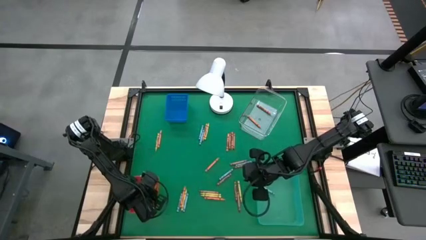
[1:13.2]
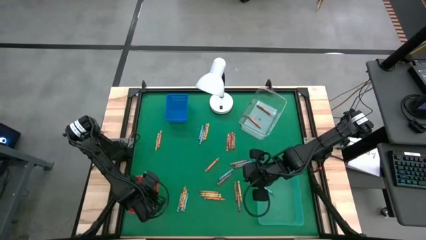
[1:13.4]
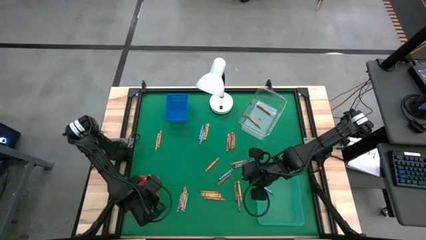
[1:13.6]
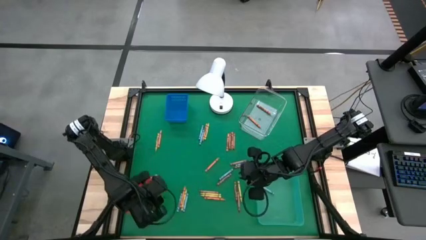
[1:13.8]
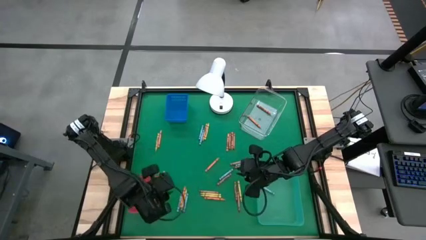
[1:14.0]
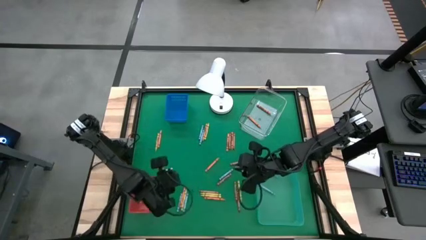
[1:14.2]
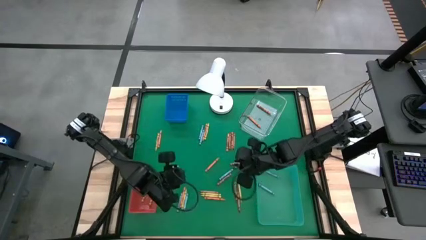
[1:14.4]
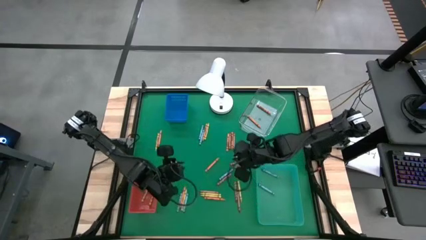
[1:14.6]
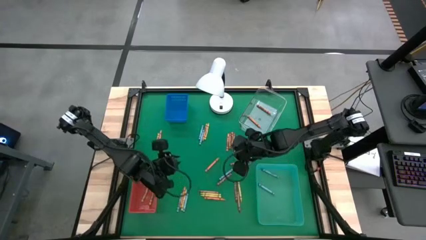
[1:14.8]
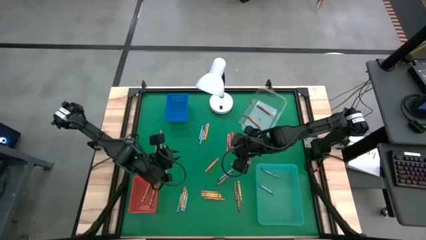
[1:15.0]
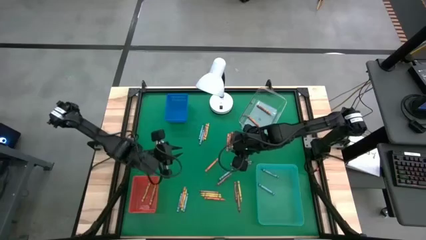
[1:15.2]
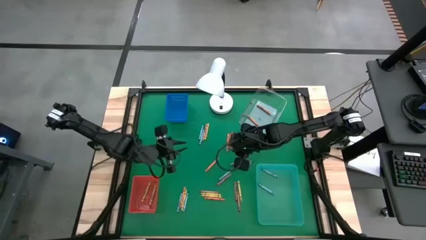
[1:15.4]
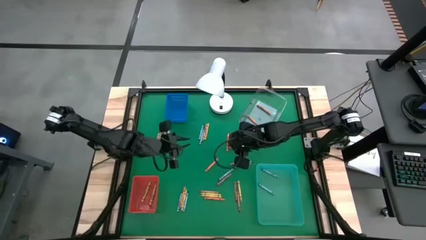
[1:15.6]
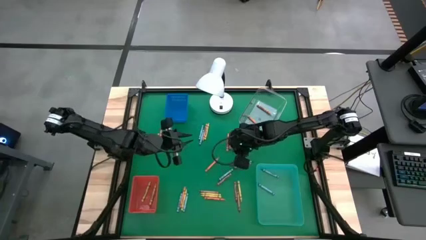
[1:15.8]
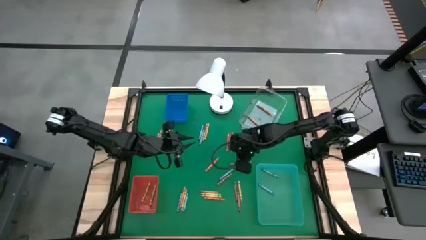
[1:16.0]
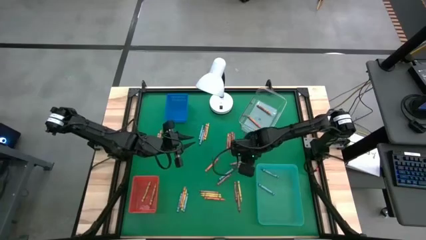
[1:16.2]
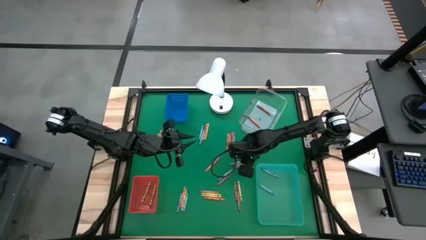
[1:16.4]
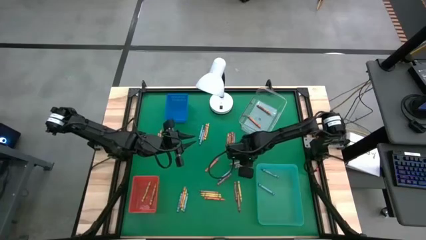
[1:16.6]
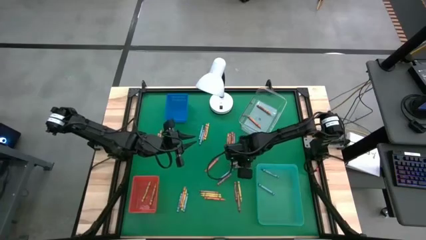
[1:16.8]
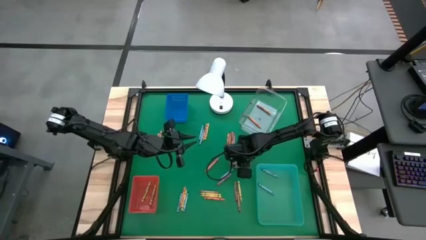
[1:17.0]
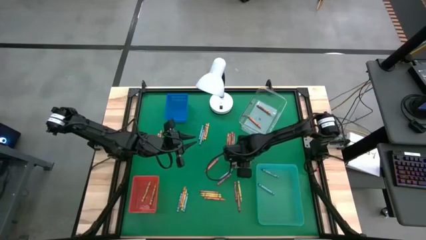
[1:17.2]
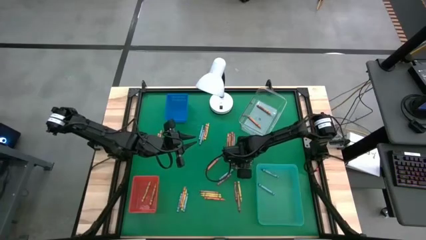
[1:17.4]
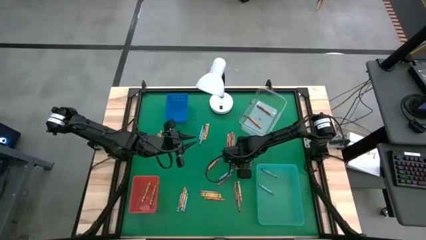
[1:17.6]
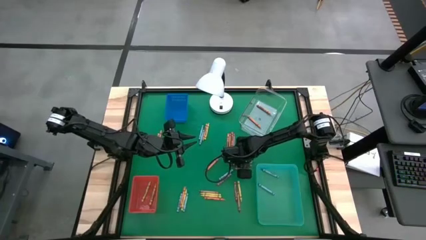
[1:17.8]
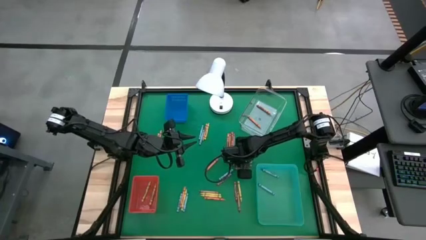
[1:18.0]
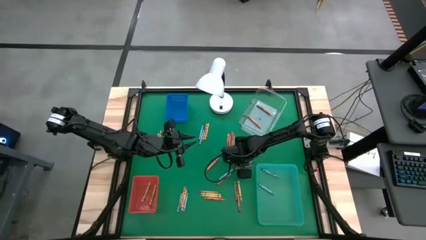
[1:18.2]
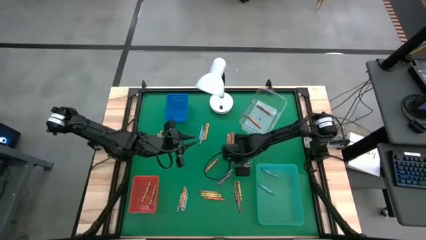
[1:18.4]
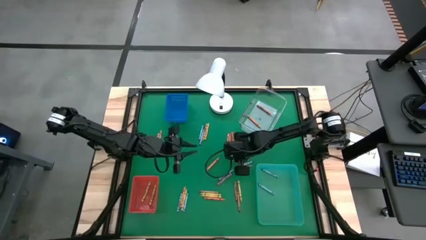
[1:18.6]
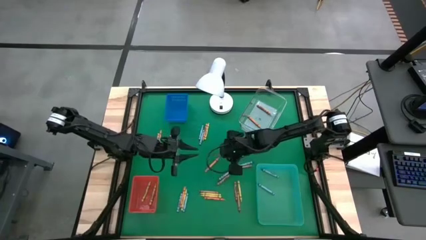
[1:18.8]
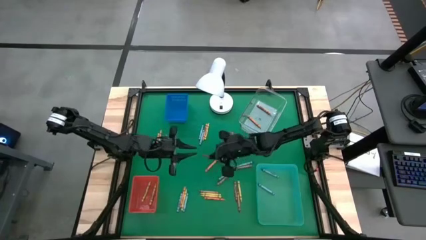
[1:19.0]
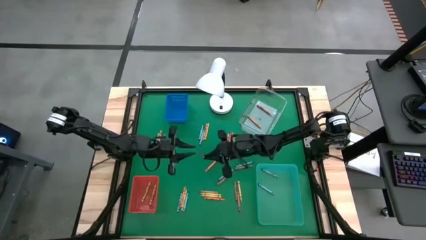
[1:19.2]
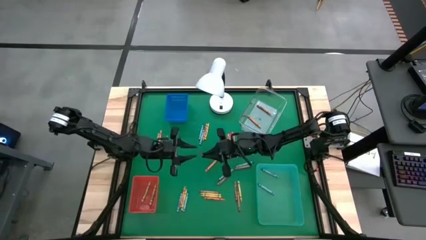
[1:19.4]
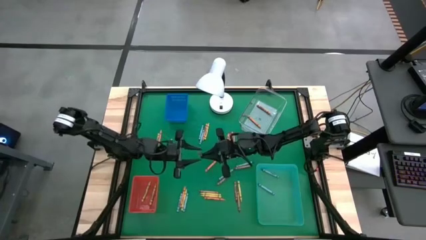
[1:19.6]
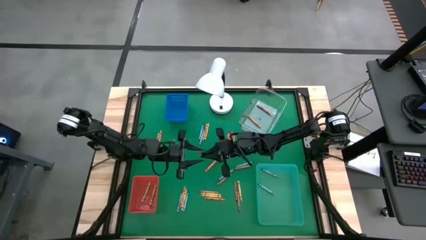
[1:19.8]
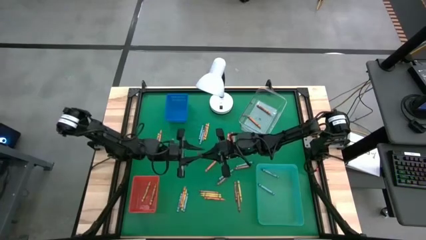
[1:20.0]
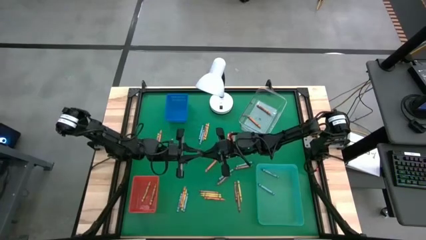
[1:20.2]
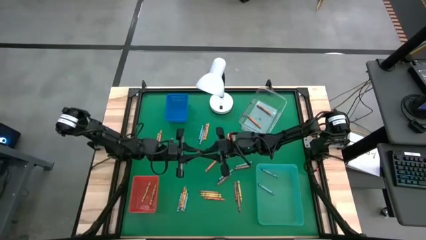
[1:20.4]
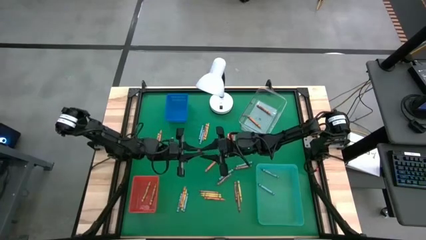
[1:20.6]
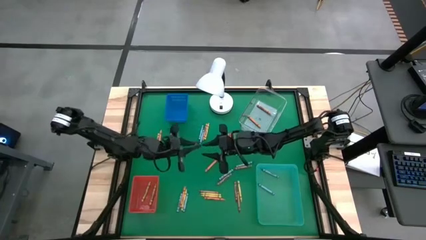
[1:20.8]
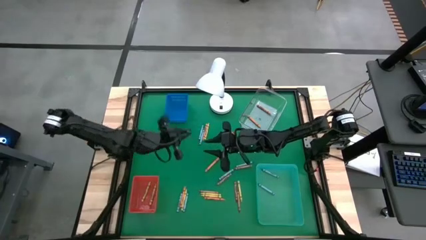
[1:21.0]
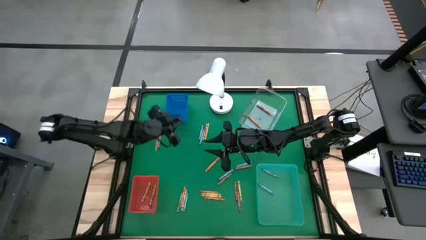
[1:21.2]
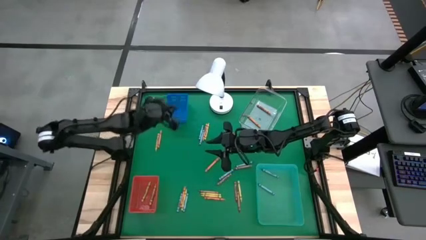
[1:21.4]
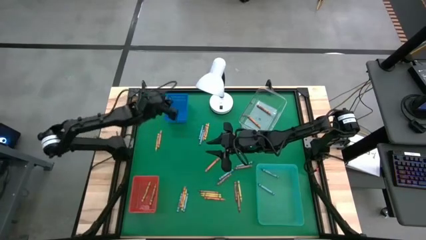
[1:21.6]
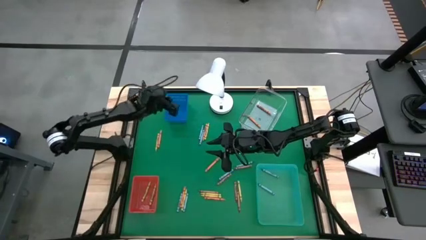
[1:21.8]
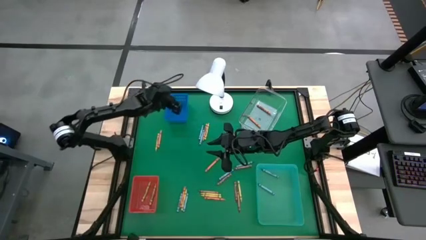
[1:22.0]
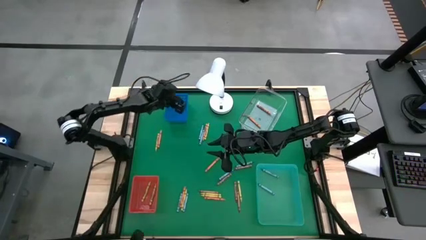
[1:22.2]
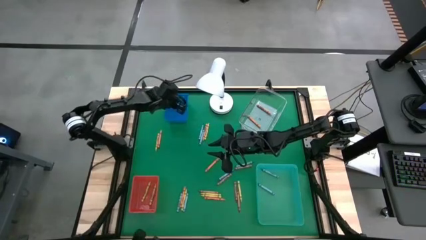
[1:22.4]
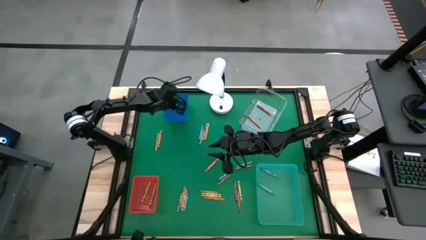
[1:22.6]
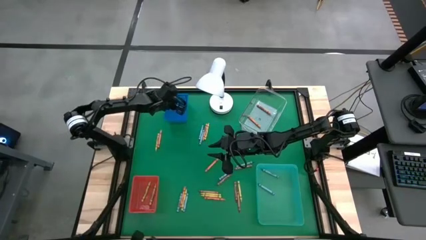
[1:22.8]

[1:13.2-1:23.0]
Task: Sort crayons
Put the brown crayon into the blue bin

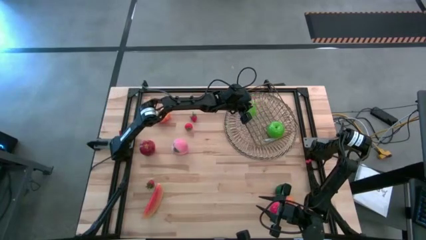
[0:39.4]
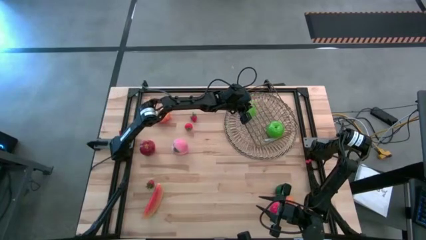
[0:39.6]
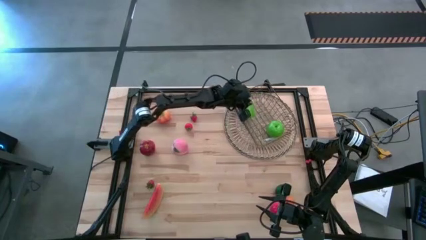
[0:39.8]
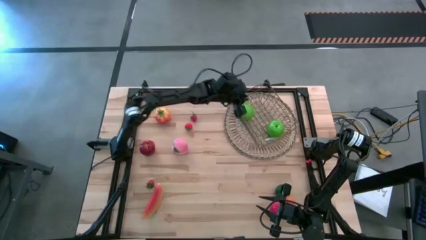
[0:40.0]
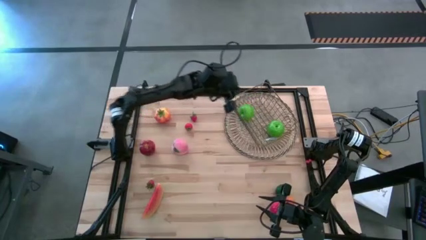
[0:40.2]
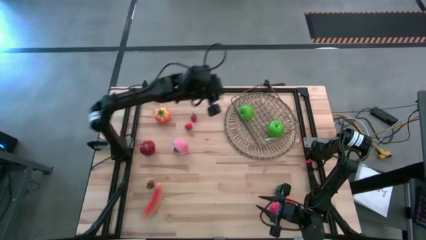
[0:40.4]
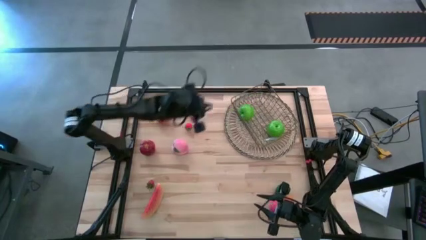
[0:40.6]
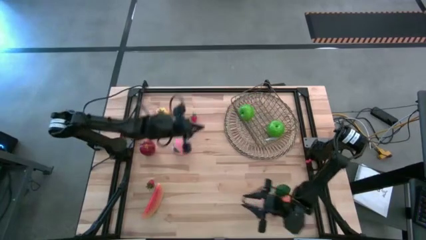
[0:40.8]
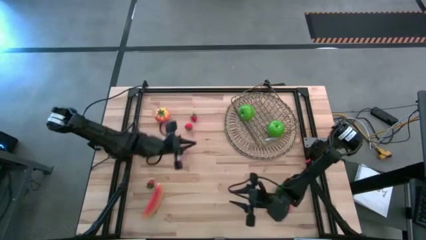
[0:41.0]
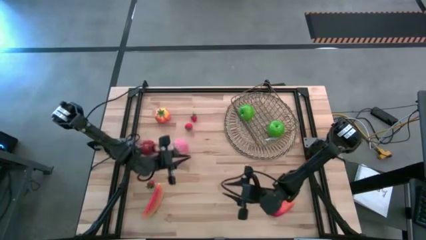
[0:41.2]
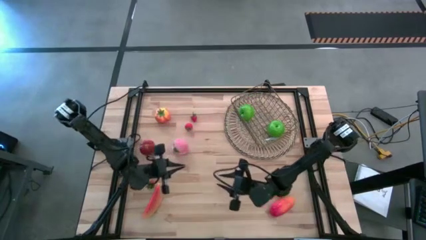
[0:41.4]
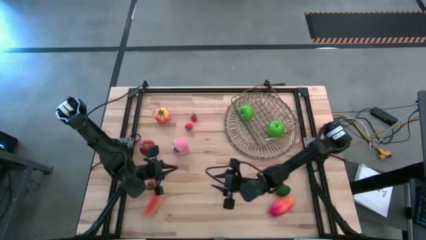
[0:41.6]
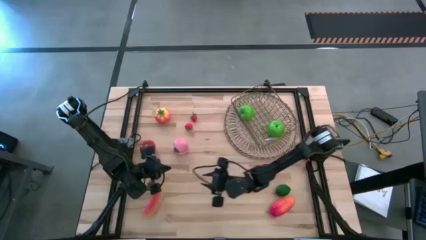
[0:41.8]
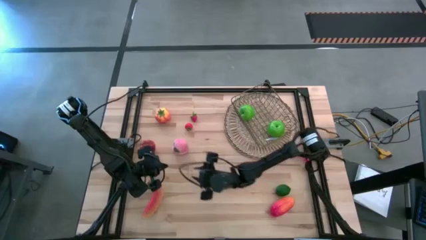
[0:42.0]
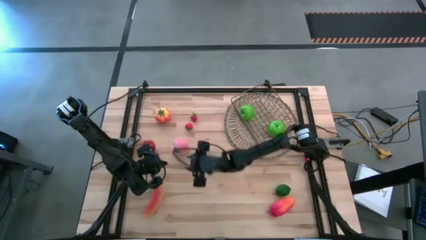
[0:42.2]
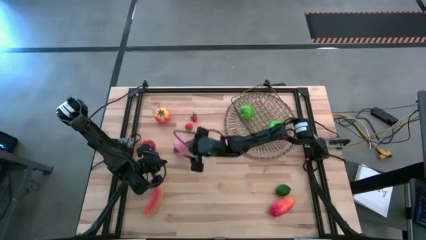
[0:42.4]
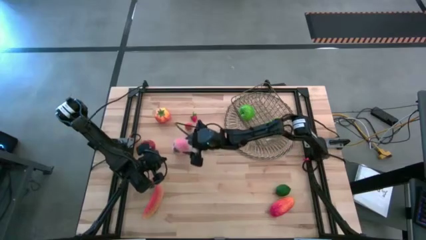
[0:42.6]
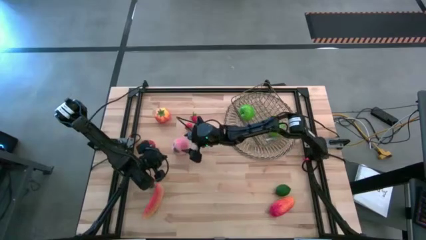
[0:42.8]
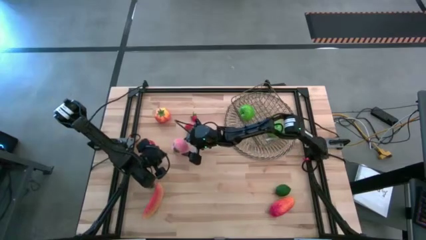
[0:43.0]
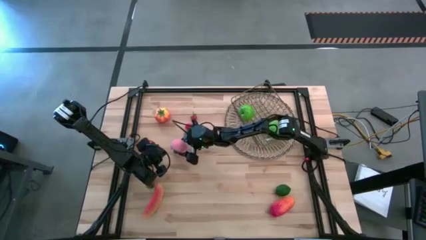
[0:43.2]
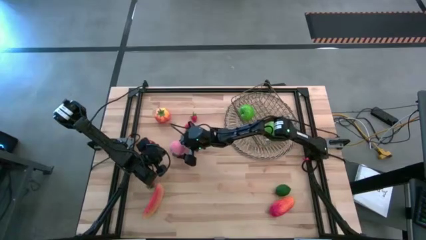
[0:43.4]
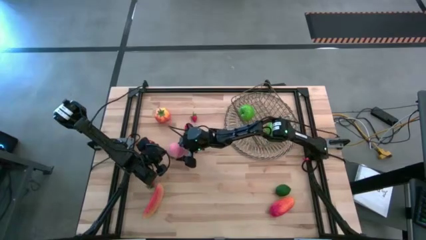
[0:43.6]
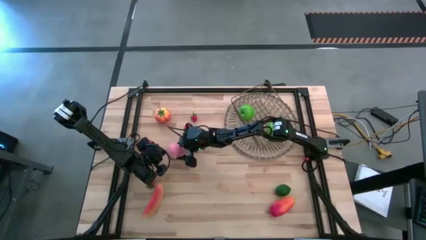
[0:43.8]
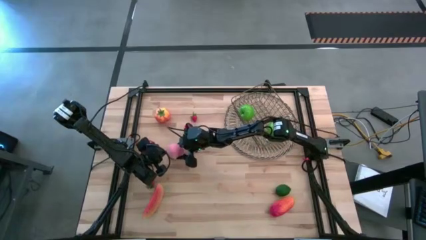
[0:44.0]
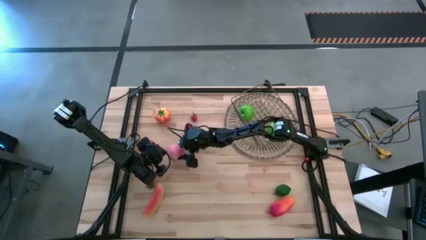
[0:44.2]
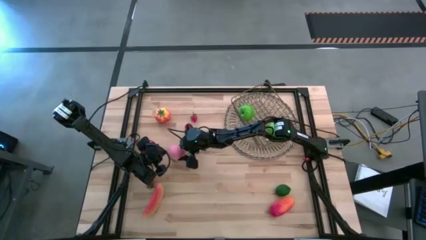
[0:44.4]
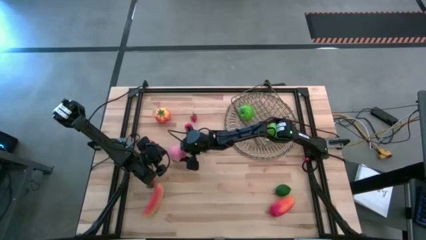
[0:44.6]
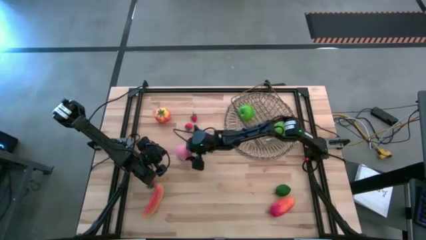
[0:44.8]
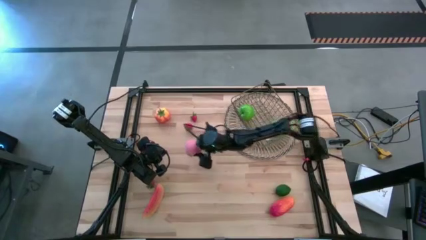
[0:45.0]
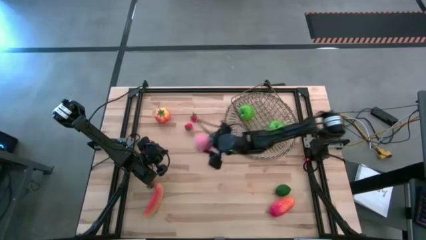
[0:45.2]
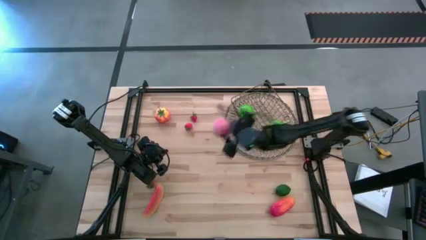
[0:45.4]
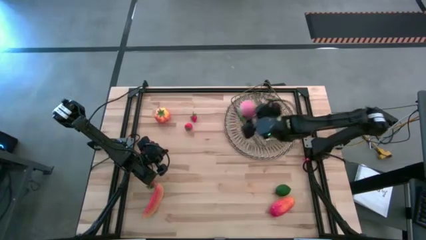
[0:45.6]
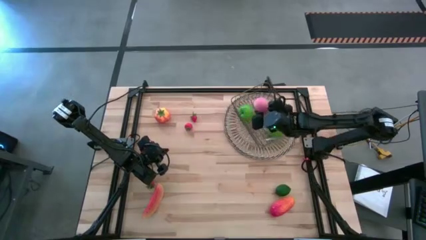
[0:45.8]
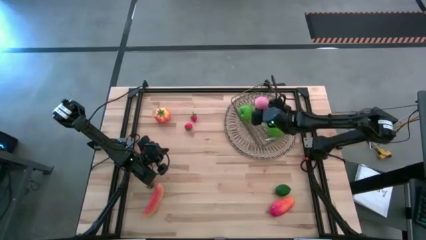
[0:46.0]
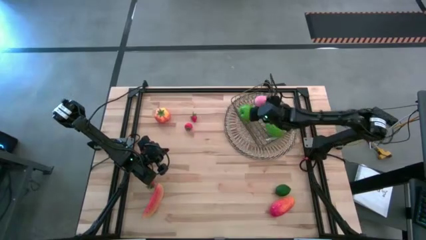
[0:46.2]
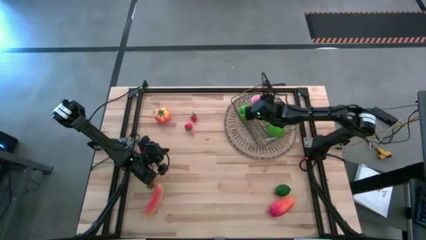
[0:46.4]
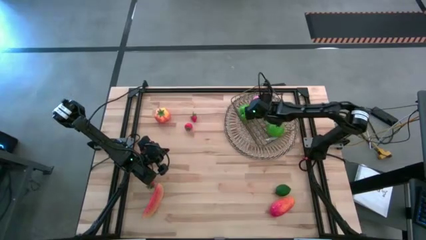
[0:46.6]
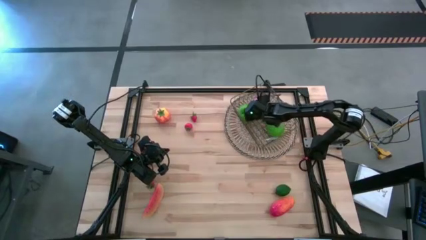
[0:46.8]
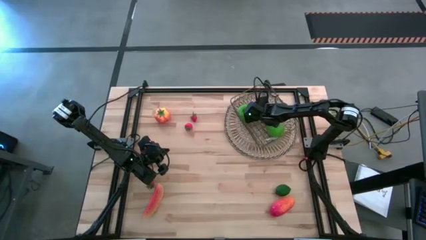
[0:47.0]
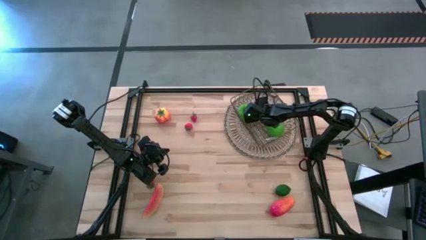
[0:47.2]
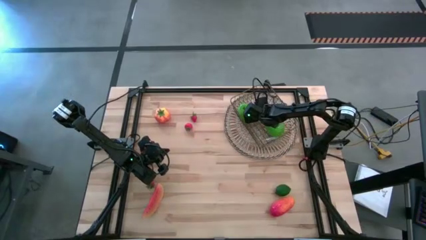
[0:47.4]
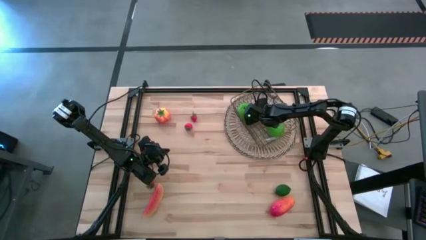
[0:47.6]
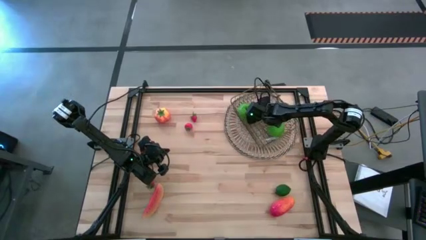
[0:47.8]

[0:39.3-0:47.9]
Task: Build produce basket
Put the peach into the gold wire basket
